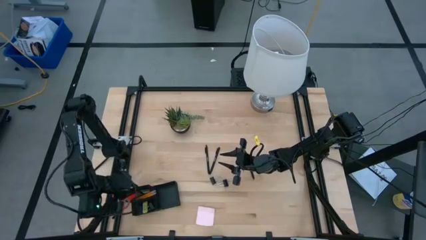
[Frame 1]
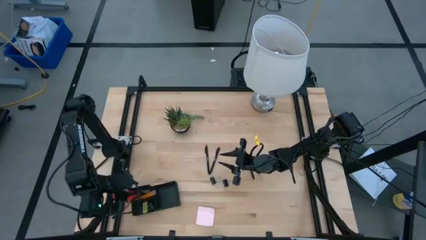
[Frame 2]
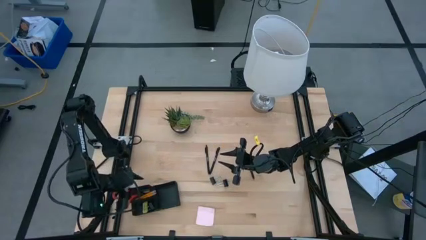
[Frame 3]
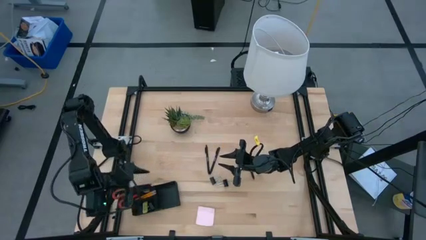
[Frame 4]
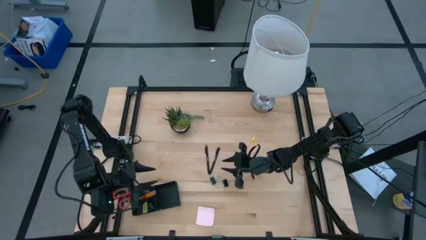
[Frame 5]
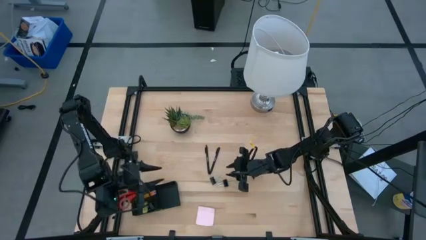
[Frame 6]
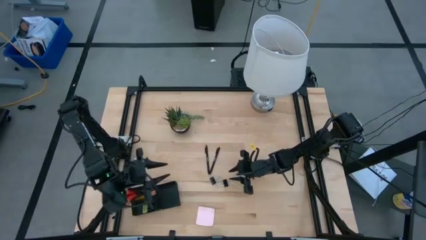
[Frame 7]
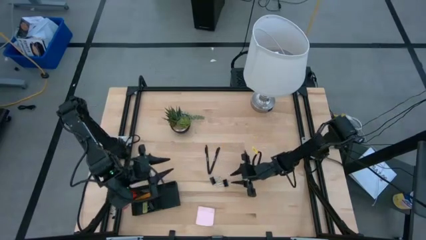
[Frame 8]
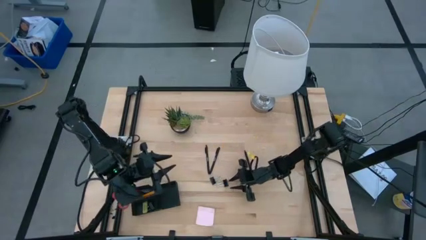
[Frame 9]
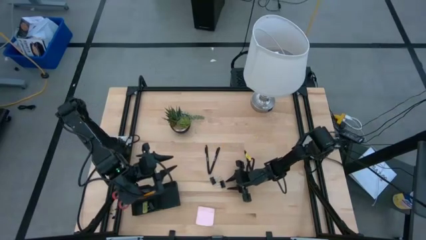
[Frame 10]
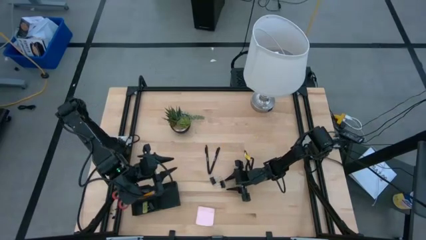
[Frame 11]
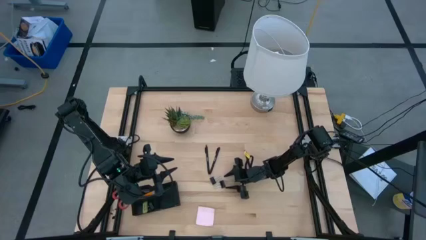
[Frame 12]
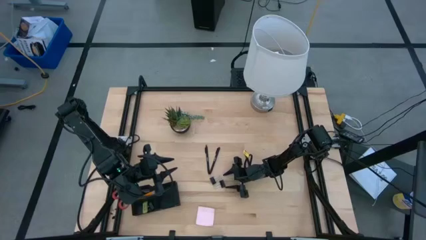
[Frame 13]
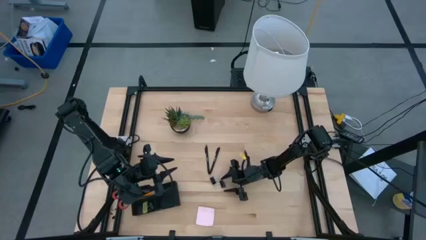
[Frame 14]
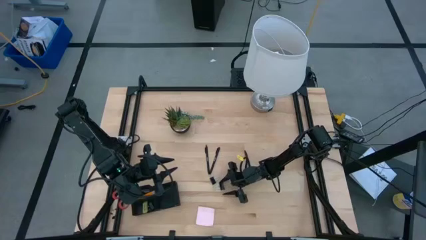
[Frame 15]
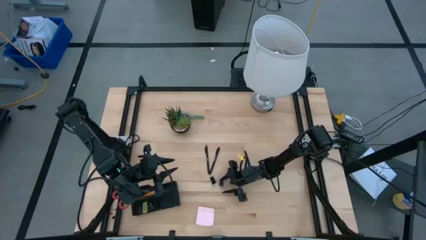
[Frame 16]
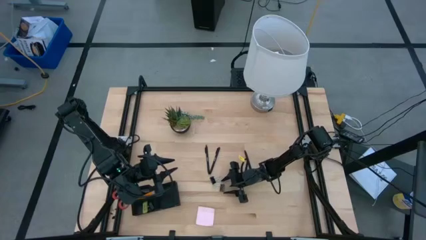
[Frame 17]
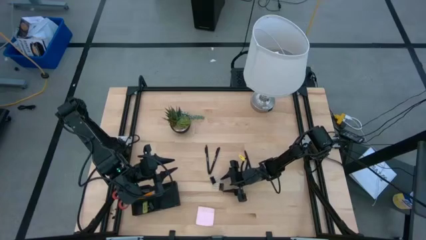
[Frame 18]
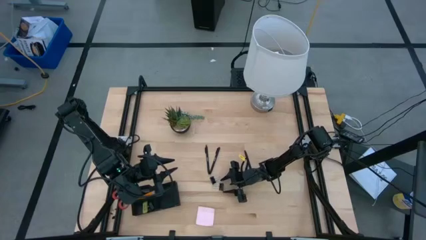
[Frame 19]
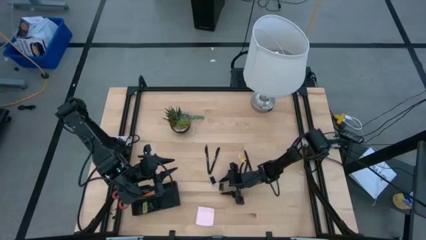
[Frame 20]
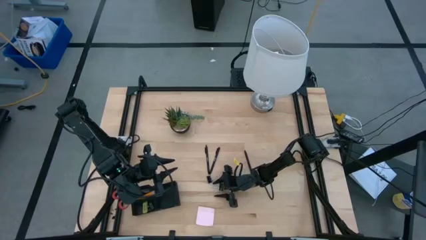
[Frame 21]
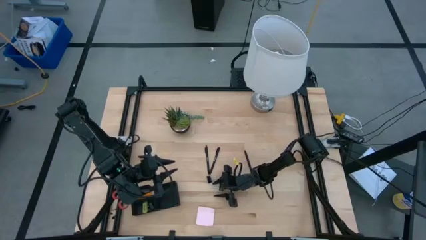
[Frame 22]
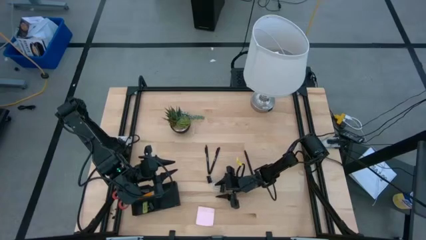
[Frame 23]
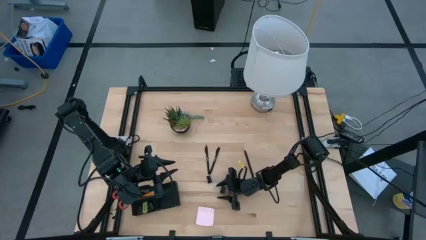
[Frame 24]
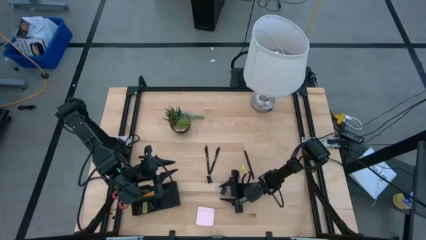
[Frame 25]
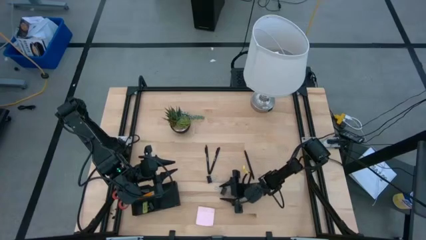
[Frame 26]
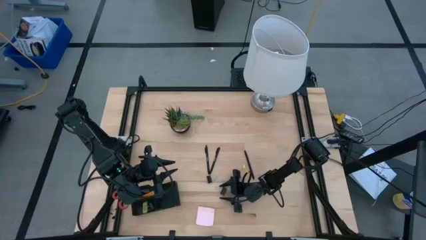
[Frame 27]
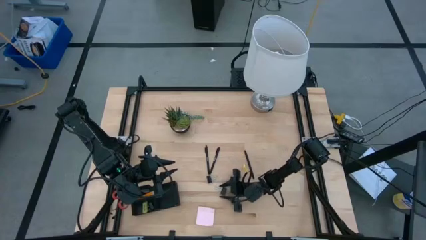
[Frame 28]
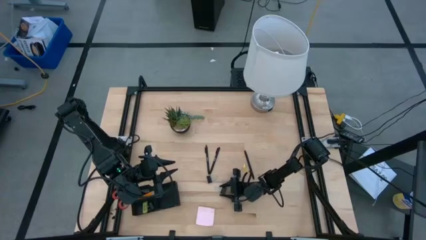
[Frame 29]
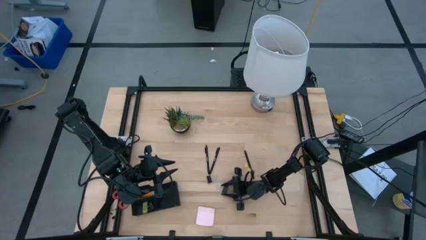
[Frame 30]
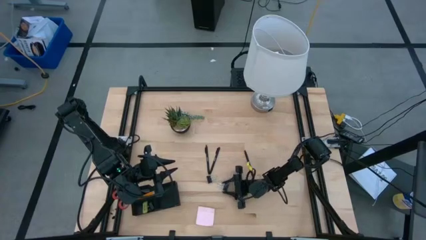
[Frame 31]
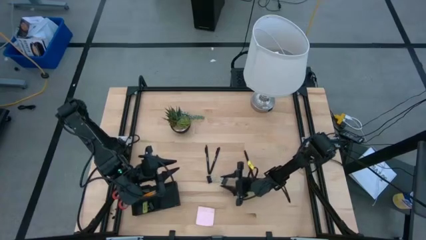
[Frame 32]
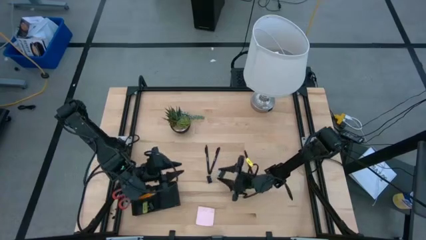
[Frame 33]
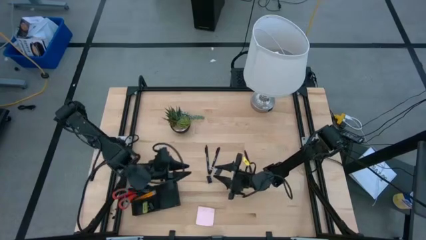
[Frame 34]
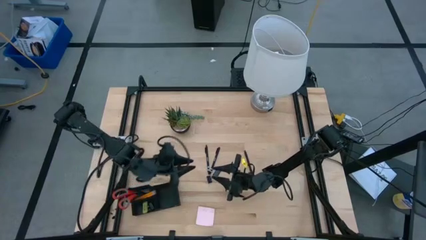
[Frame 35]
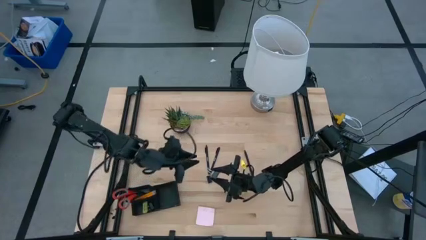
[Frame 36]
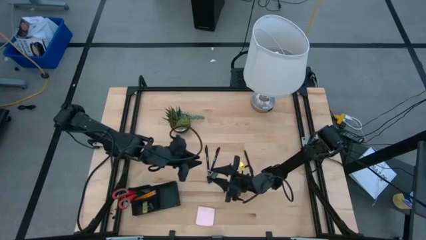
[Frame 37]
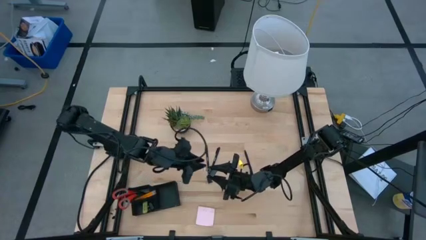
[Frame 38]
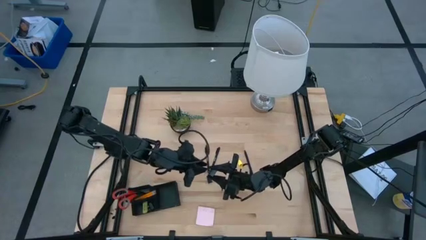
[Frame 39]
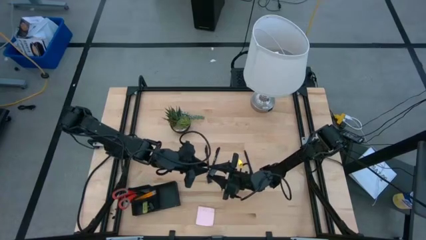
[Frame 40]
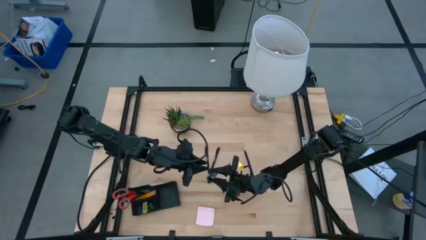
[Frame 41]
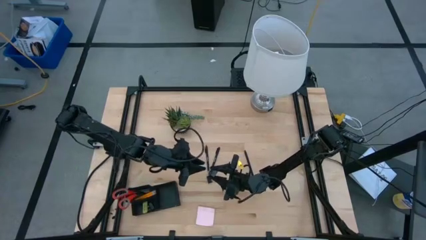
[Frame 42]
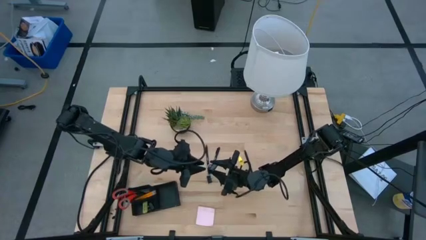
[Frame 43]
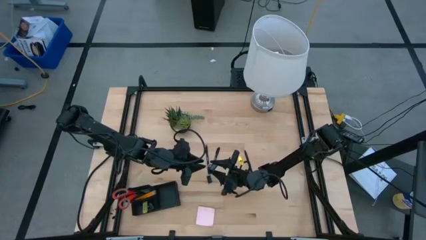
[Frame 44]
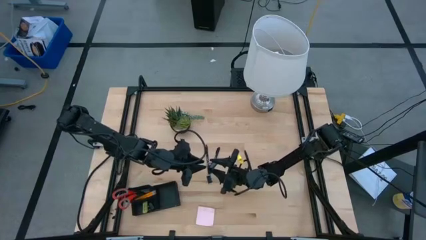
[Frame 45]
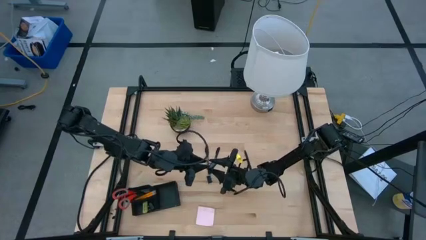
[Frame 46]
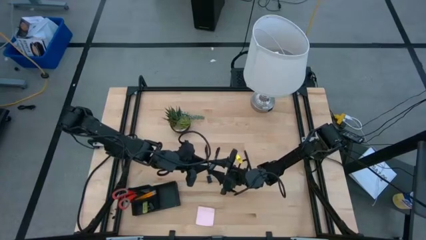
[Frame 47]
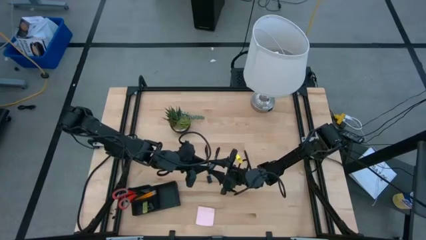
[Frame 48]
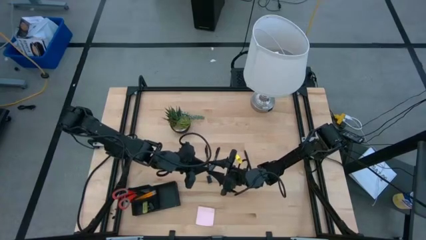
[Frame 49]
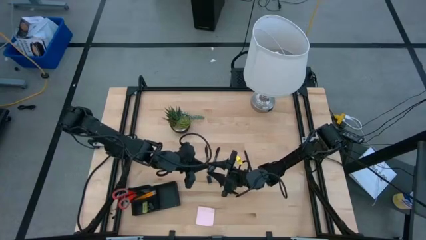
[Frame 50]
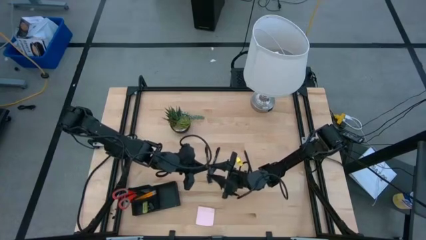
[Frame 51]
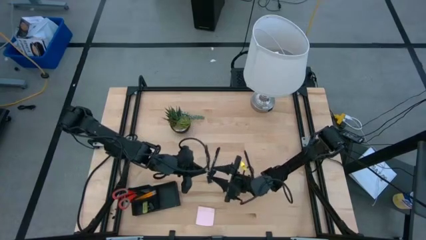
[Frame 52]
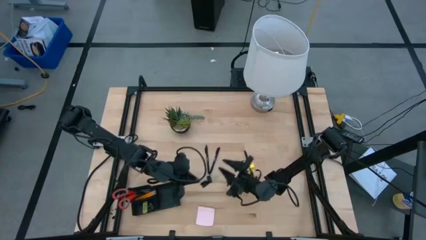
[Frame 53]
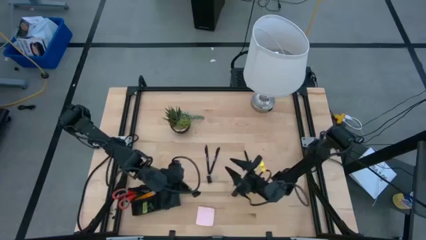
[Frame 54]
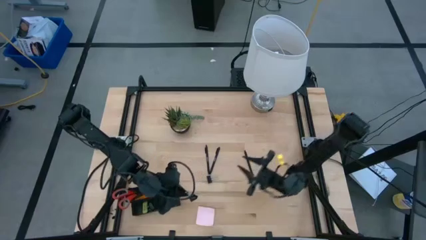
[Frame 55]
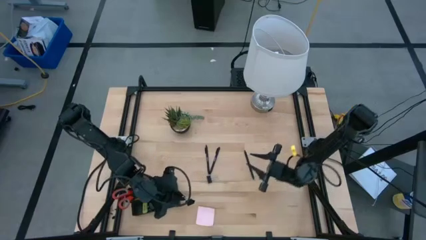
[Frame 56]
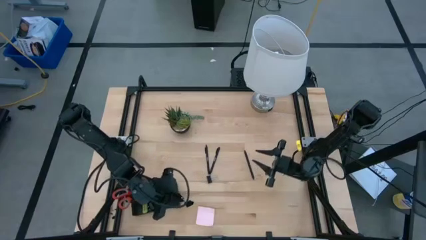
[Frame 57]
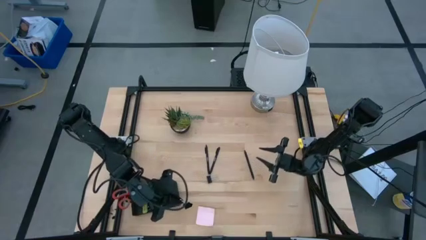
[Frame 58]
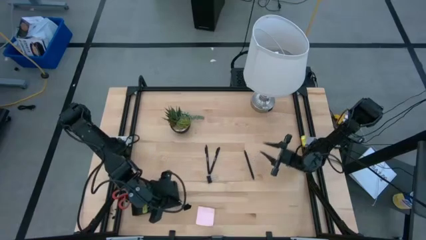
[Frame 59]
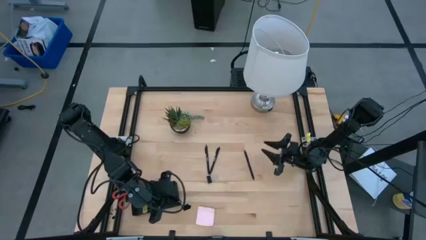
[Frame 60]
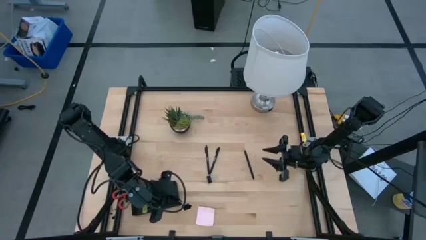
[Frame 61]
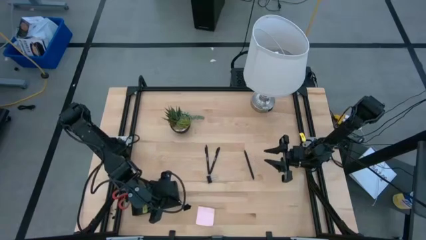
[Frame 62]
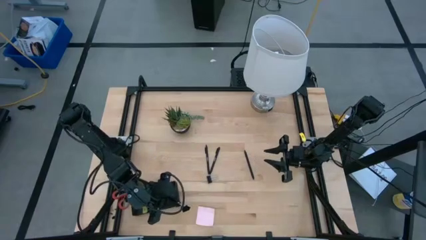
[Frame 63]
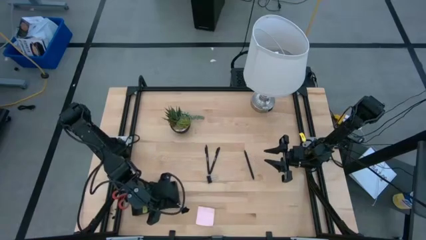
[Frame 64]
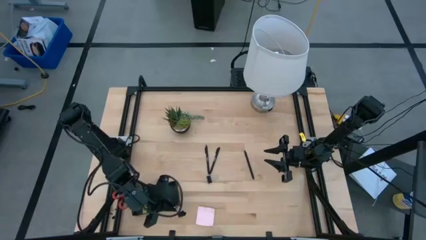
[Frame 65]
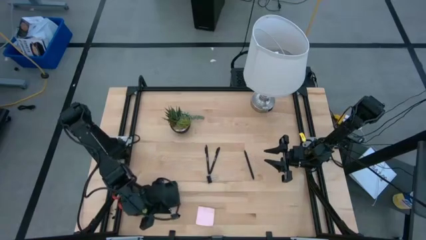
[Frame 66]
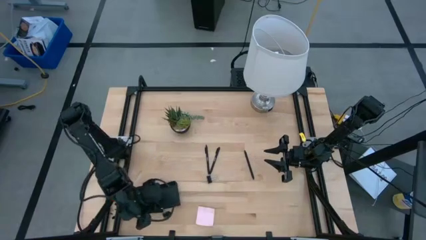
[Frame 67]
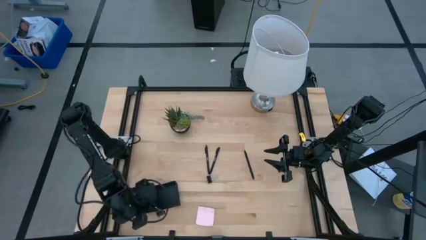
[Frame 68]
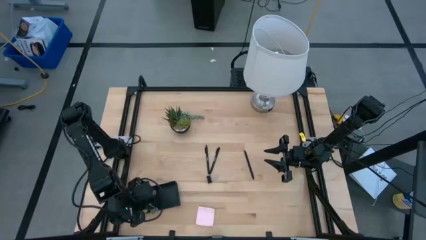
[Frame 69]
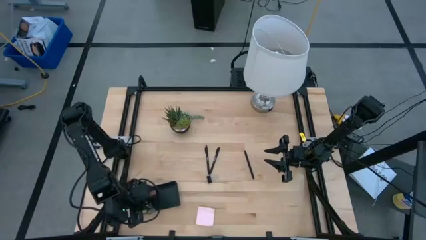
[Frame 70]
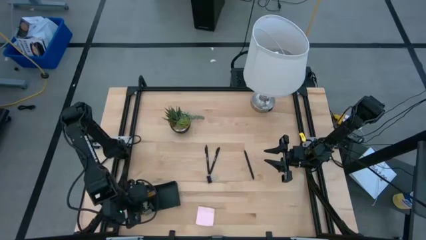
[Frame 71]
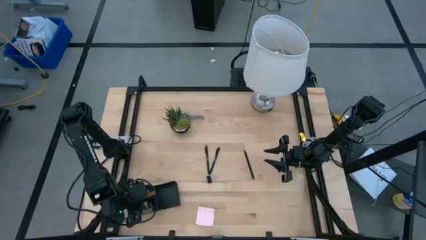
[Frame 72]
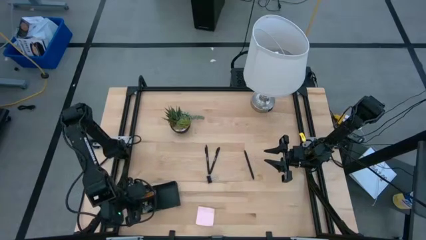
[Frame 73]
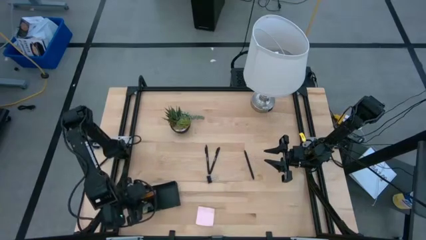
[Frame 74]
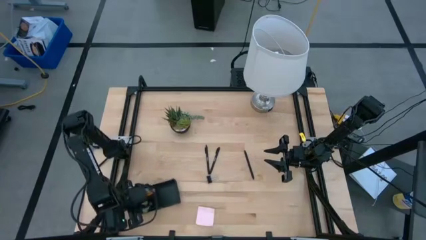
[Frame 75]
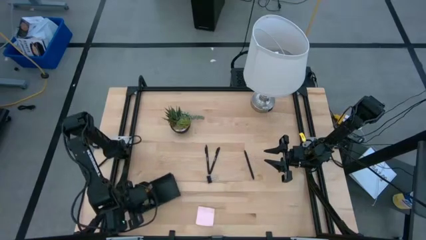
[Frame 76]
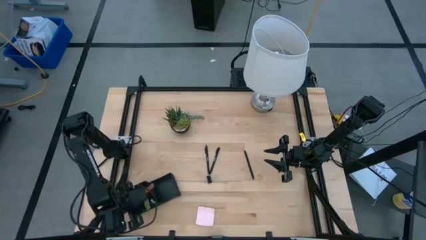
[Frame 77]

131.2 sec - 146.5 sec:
Task: Pick and place office supplies into organizer
Put the right binder clip into the bottom left section of the desk organizer

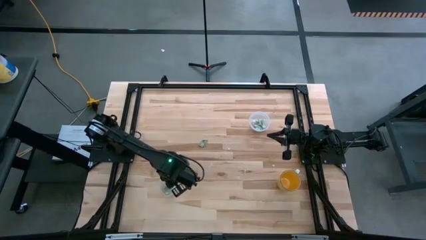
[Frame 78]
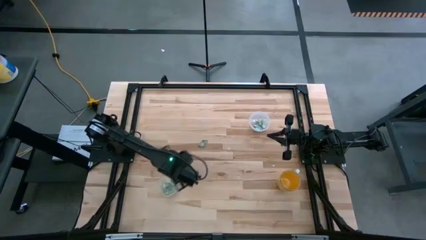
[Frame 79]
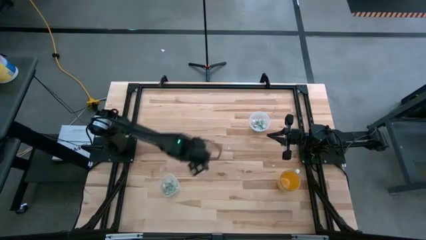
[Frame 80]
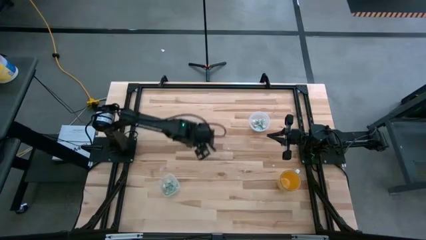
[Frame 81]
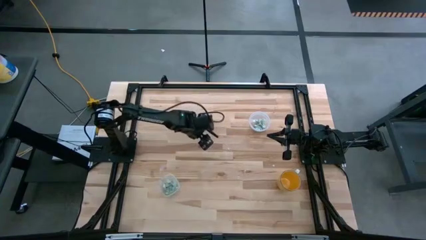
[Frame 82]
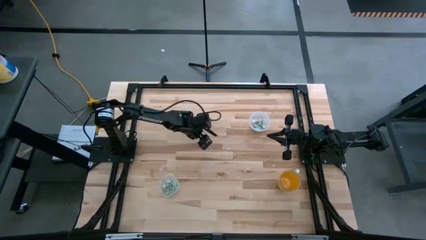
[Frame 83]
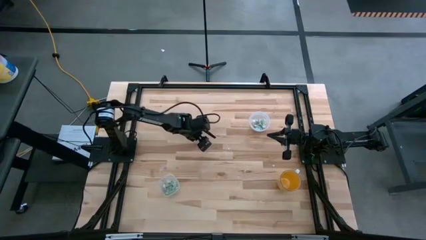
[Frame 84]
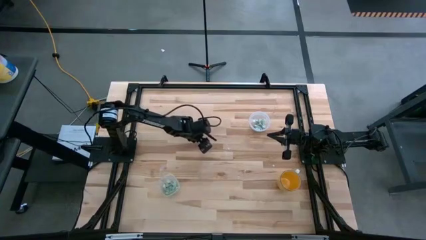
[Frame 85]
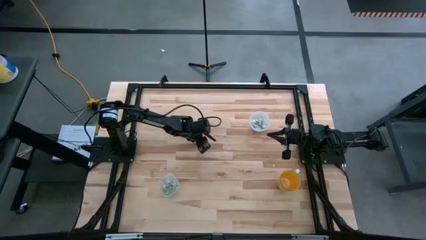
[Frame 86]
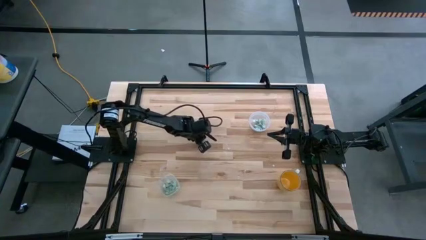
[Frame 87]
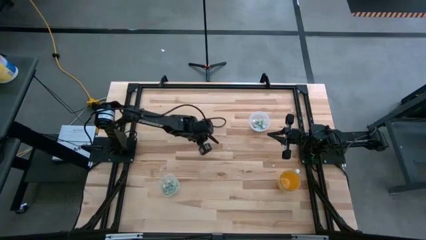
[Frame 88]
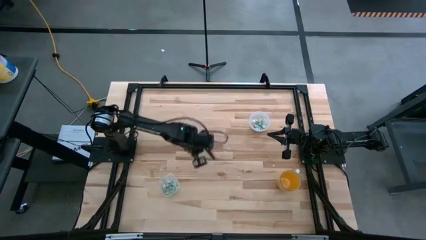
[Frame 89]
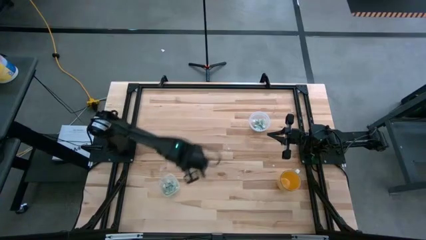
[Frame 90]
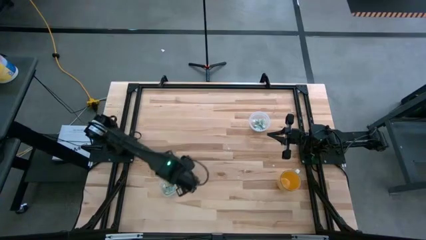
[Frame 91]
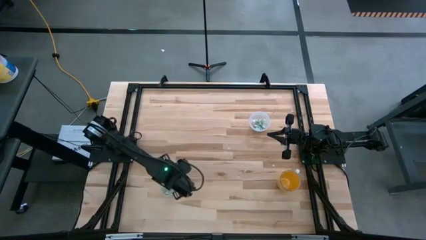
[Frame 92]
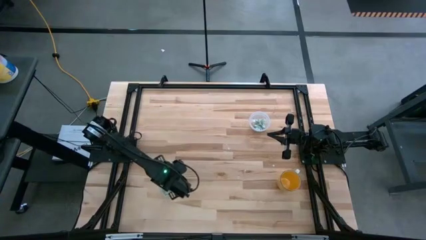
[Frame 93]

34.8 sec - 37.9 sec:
Task: Pick and place Stevia / Truvia into bins
Put the stevia packet into the oval transparent container
